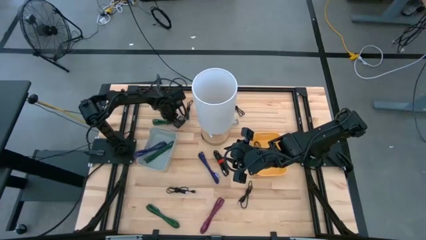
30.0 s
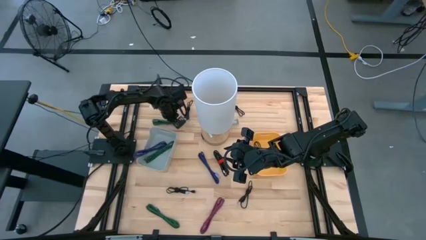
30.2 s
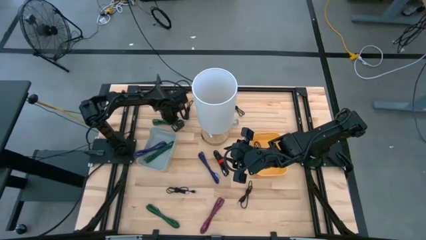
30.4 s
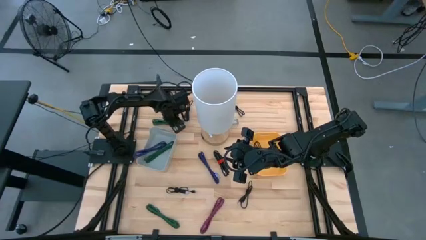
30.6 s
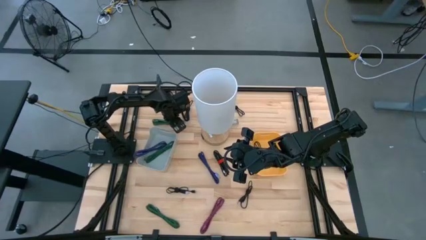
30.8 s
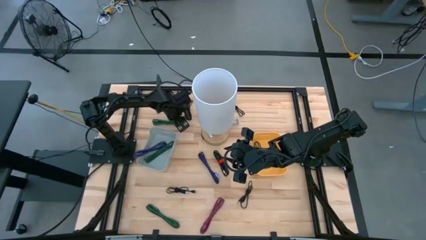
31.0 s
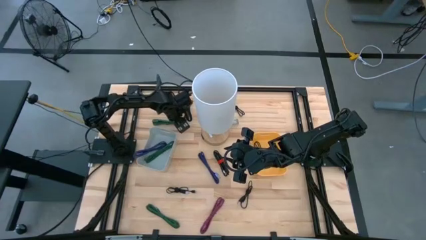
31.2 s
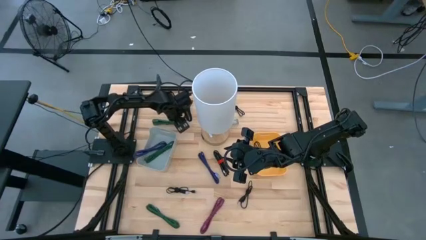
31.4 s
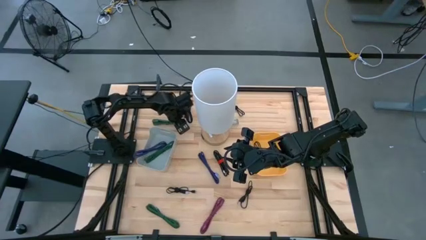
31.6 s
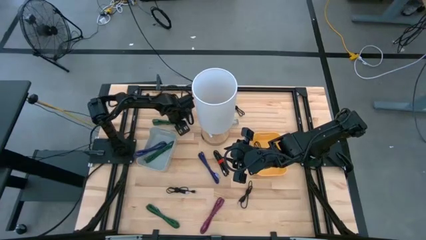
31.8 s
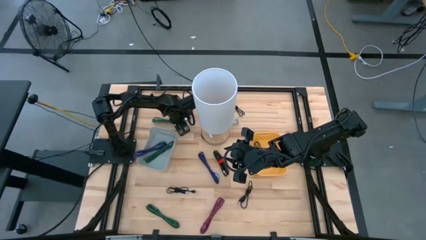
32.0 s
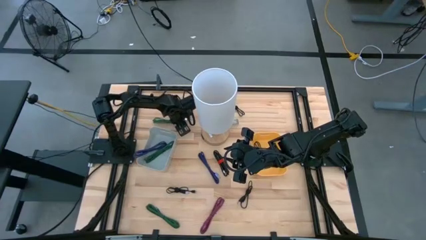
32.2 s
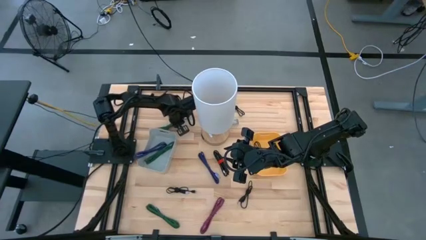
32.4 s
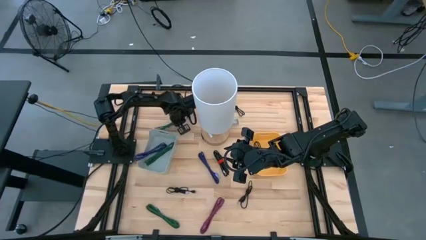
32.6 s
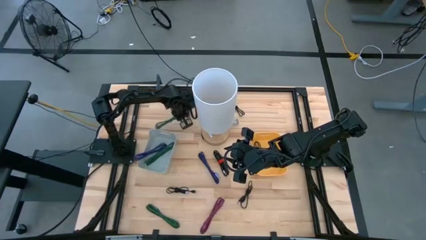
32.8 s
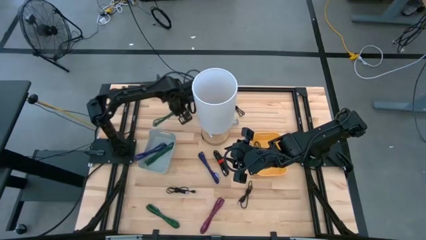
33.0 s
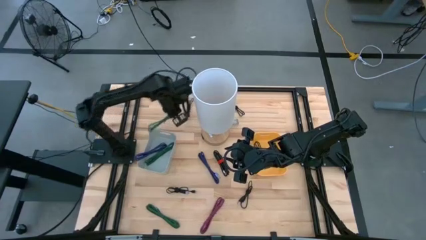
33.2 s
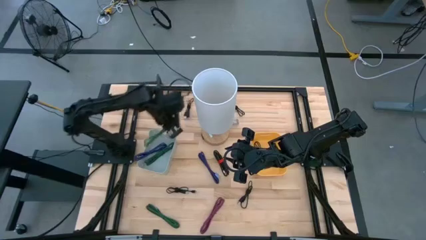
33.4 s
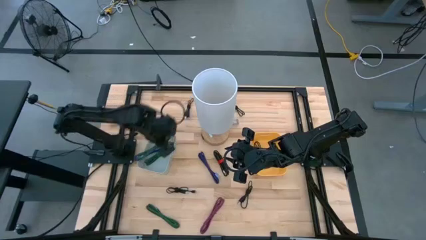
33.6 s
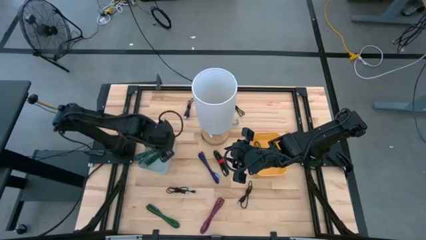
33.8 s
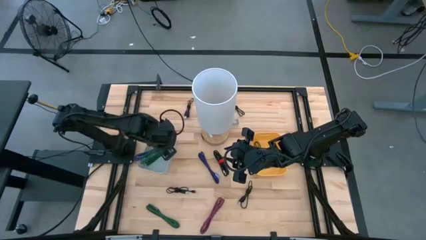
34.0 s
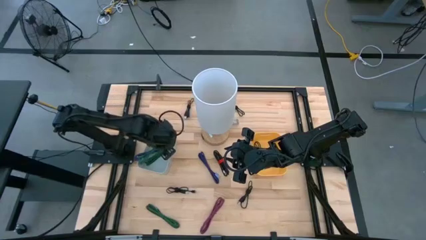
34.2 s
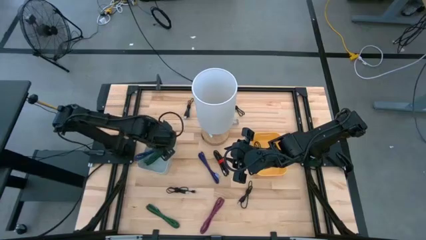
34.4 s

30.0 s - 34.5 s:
Task: Pick & Place USB Port
Put the top green patterned USB charger into the gray bin

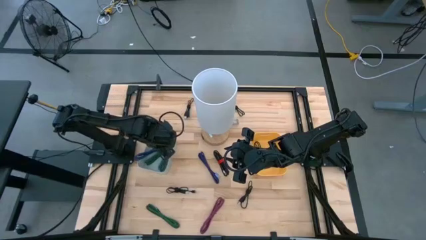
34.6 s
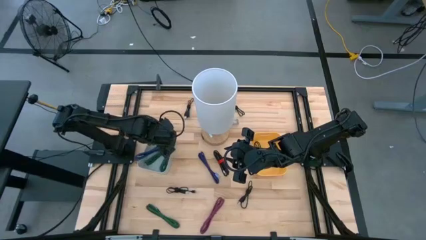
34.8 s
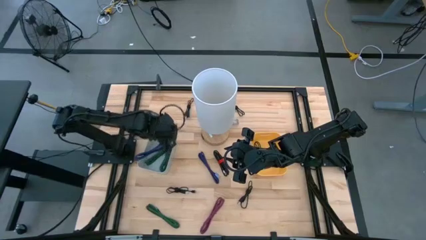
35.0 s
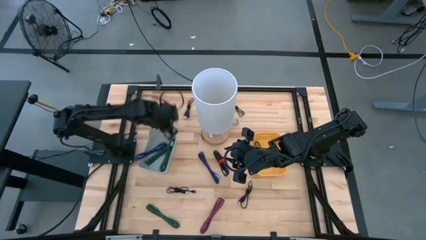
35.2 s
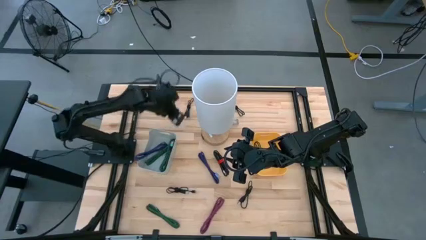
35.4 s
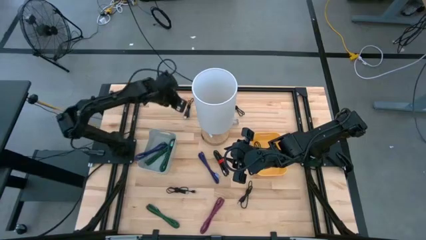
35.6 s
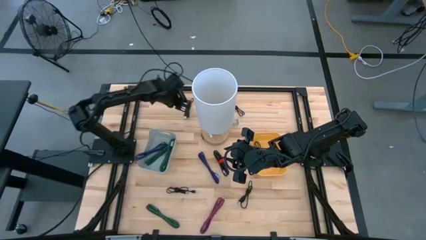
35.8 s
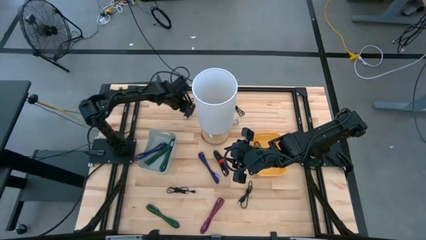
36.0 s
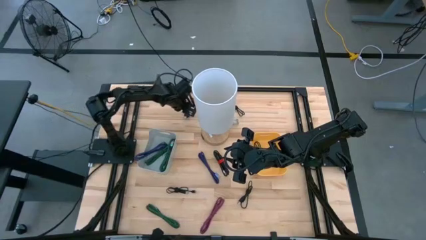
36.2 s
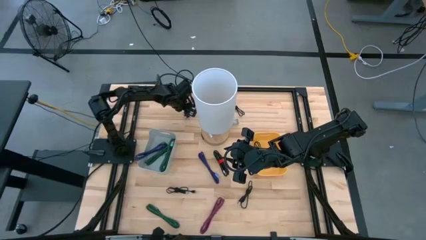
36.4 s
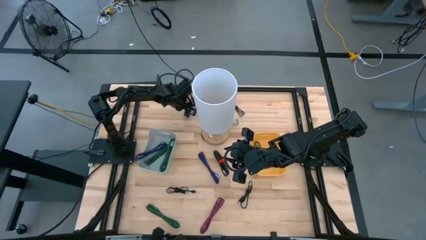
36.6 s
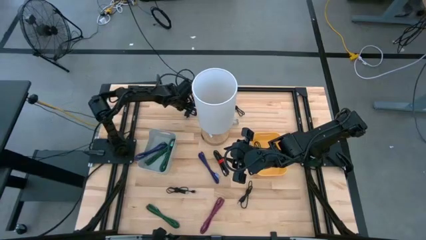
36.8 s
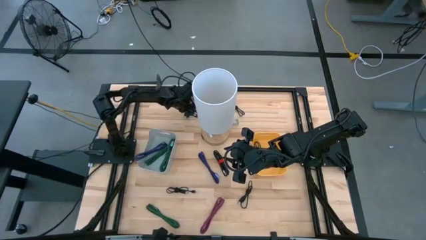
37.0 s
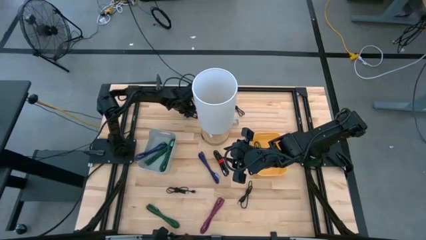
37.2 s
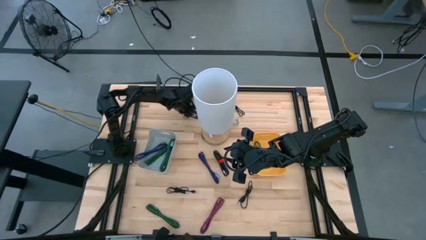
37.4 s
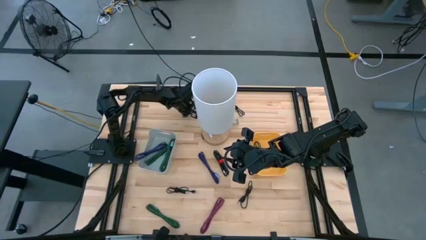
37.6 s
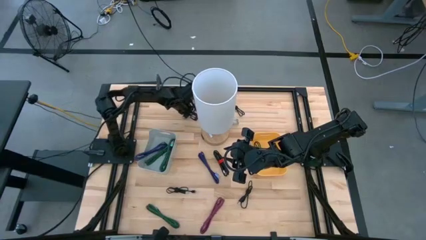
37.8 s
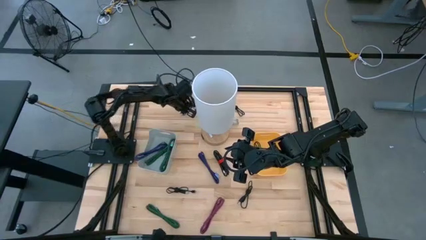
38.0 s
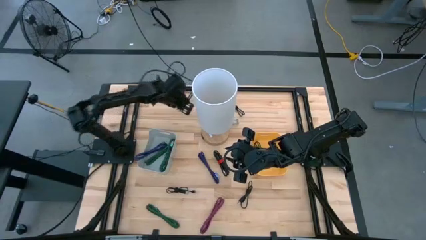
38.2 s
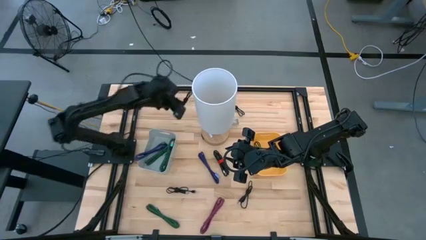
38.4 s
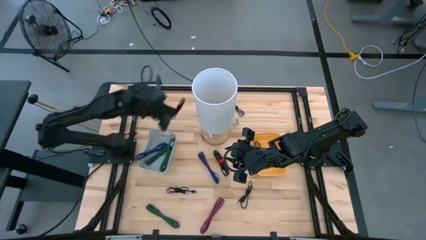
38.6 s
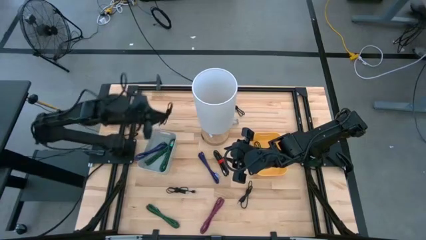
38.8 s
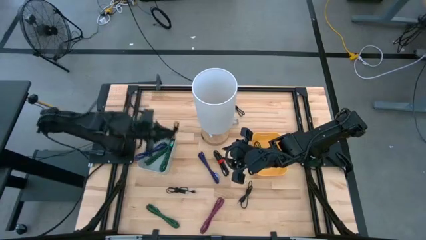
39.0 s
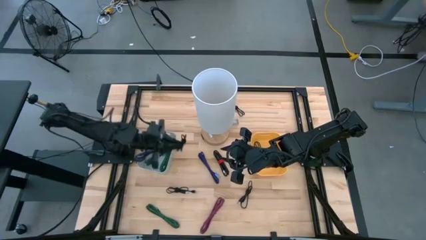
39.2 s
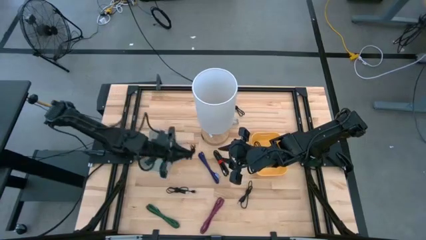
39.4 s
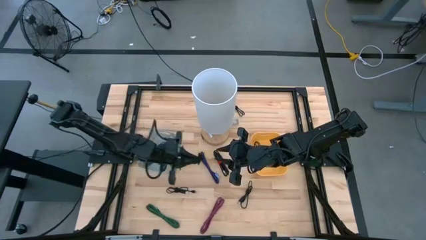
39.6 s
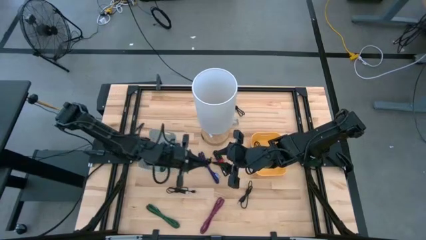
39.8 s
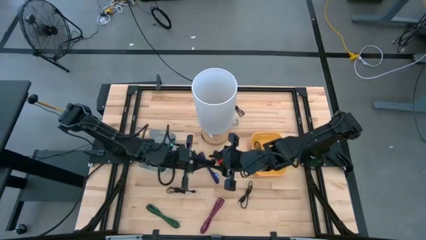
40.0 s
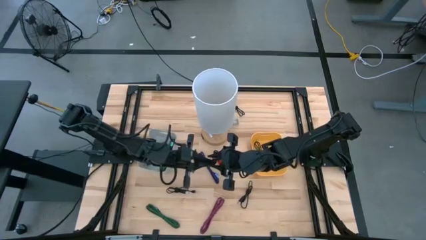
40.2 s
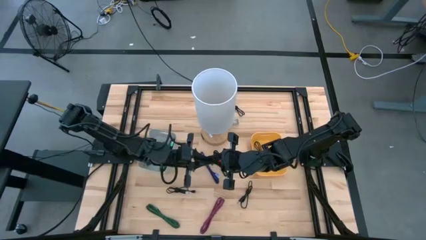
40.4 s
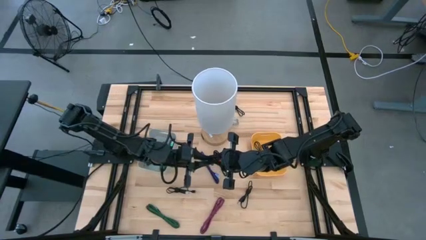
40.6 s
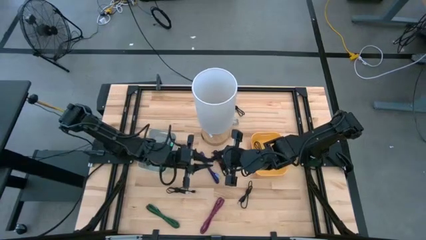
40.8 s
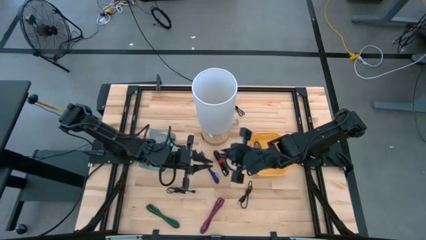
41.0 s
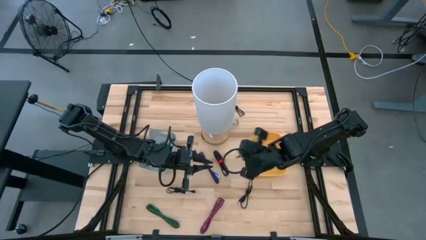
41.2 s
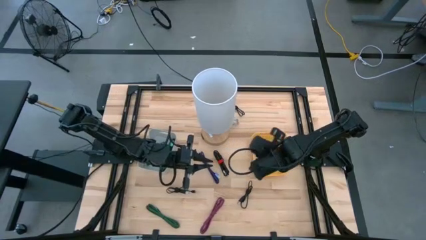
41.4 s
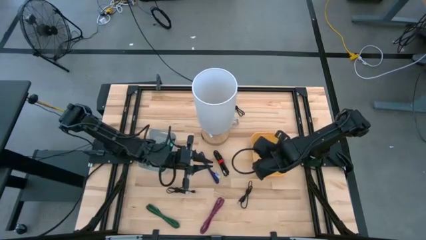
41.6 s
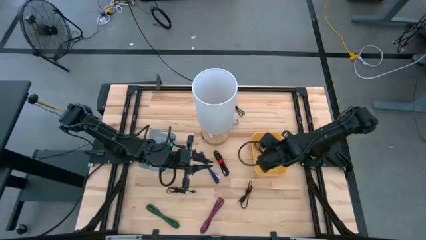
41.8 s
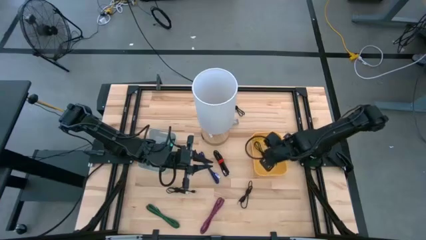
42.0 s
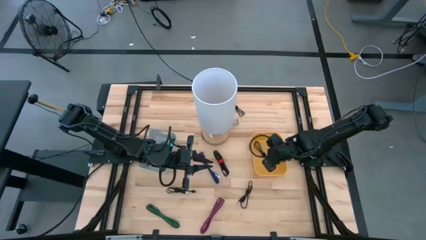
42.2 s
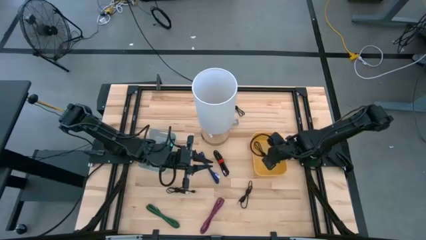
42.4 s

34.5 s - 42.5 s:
Put the black USB charger into the yellow bin

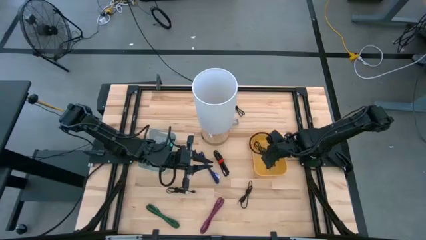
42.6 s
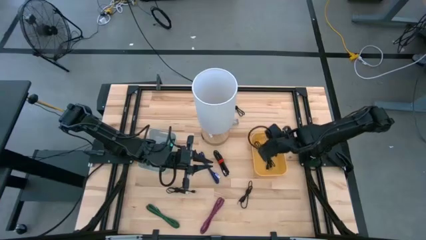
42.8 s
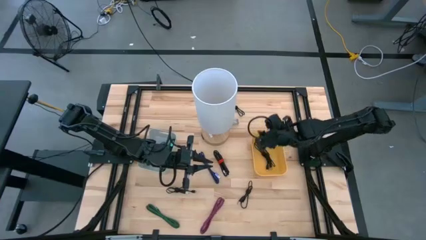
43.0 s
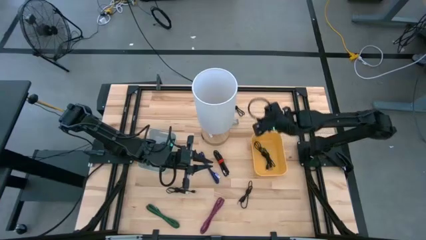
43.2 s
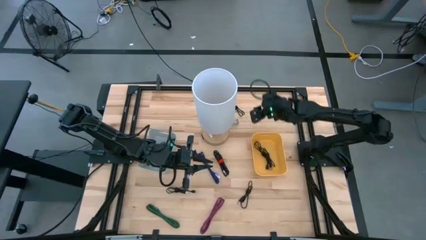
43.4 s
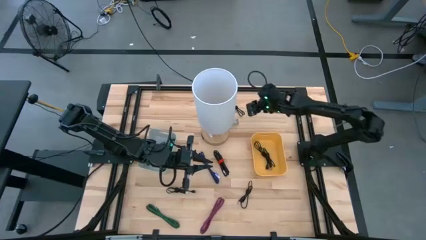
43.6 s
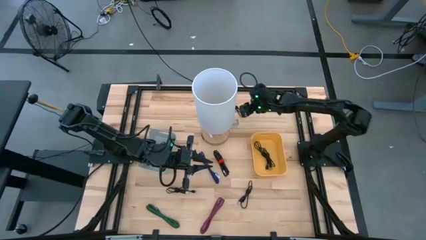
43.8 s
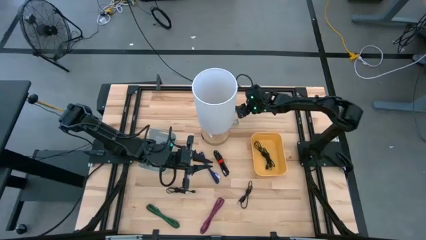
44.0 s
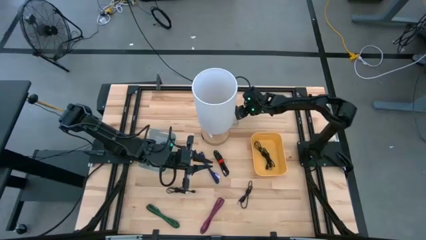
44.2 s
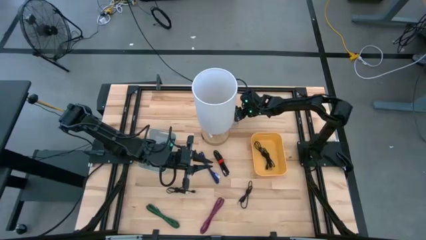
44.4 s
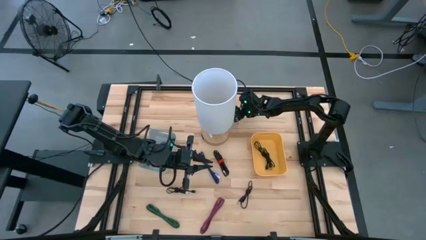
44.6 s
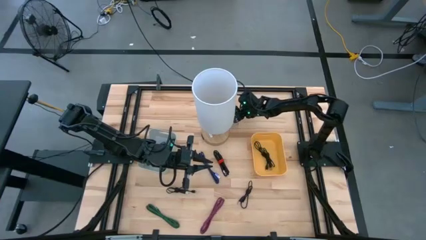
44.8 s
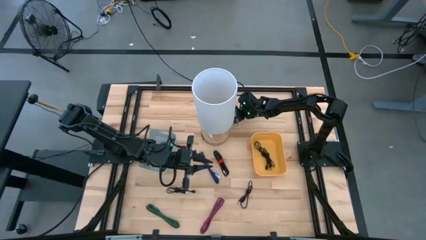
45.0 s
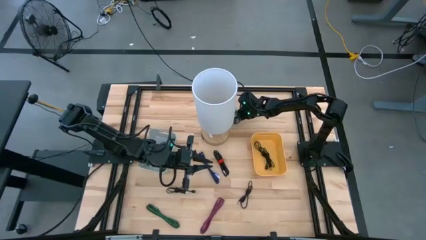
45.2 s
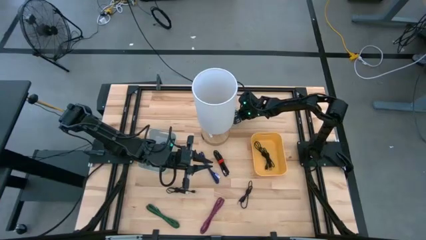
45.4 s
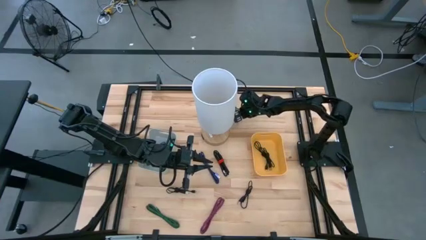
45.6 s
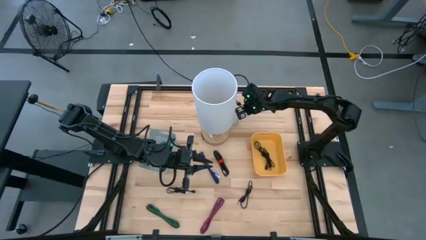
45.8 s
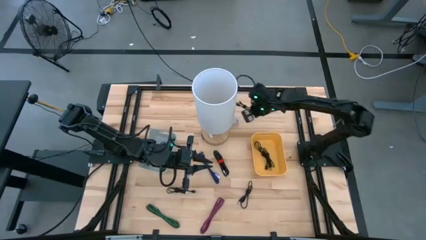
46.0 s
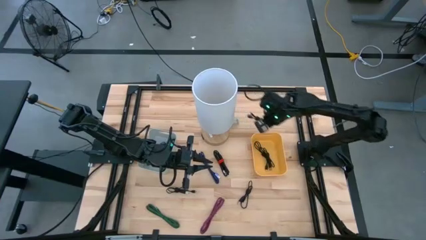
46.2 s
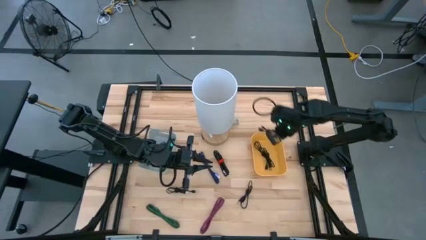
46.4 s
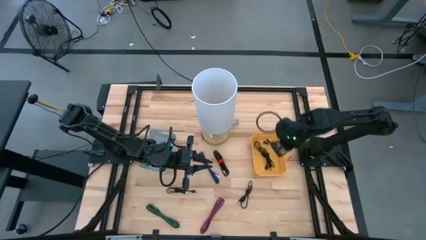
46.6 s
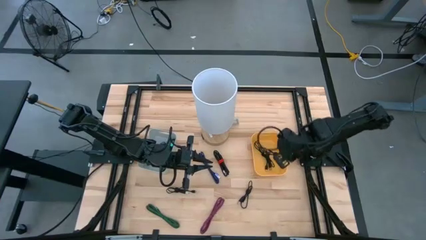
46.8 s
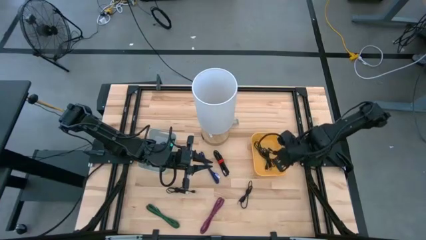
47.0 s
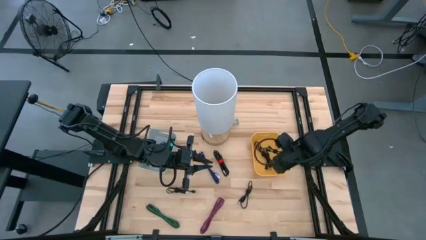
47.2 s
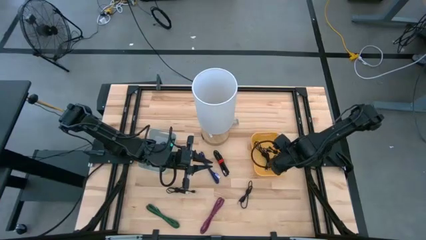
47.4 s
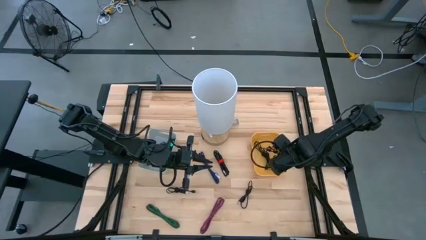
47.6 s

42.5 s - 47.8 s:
Put the black USB charger into the yellow bin
